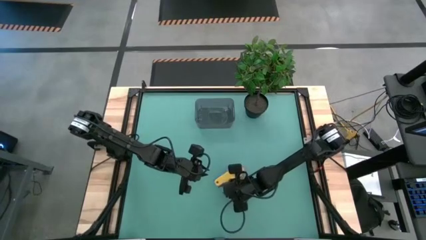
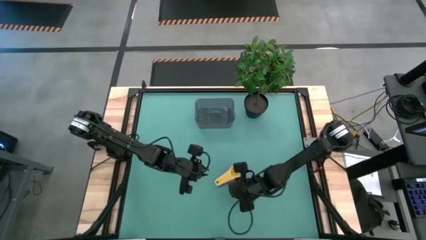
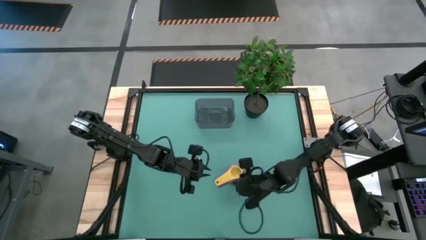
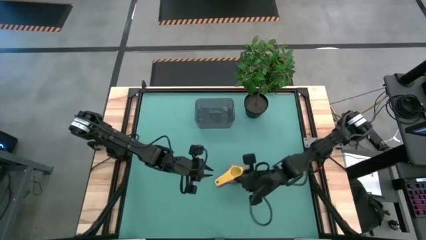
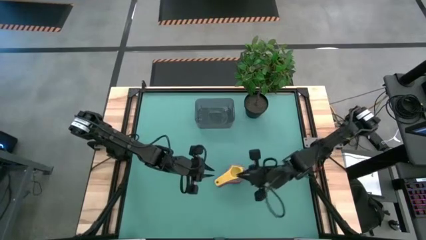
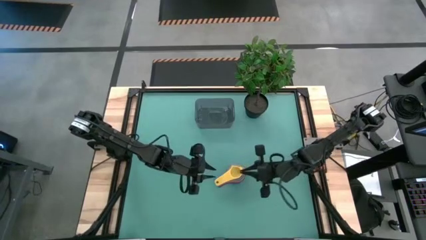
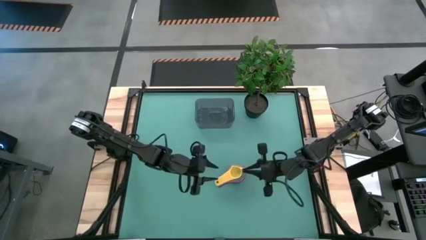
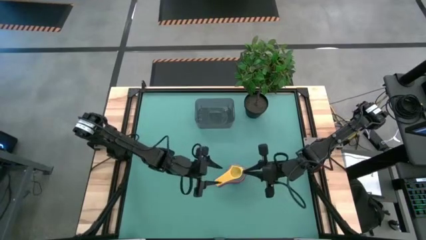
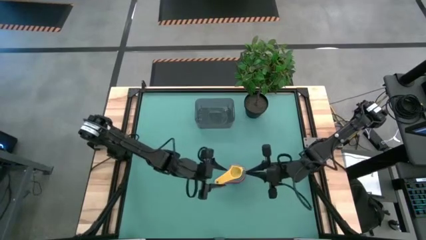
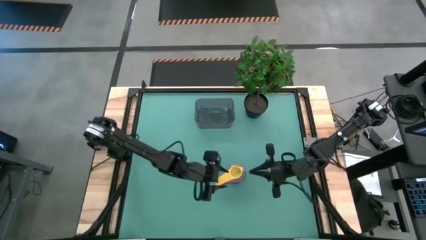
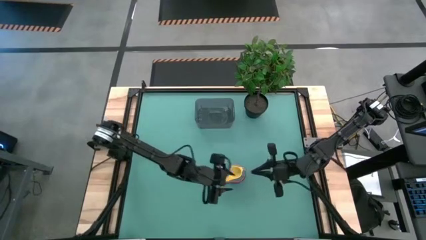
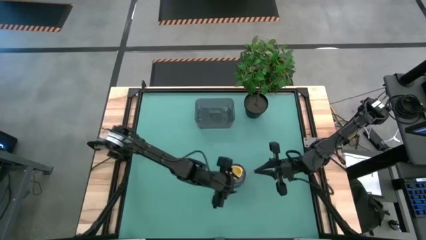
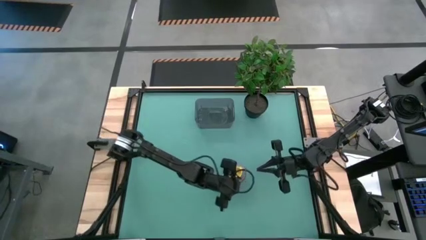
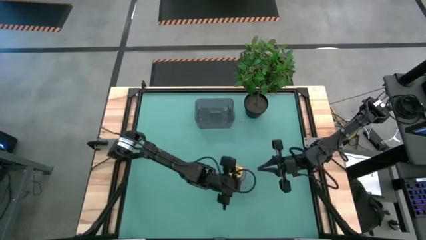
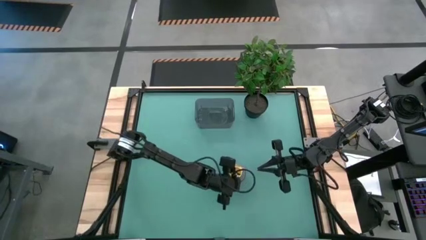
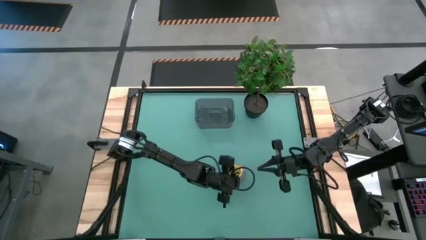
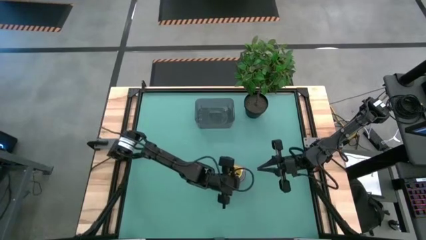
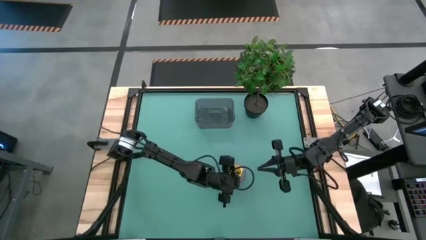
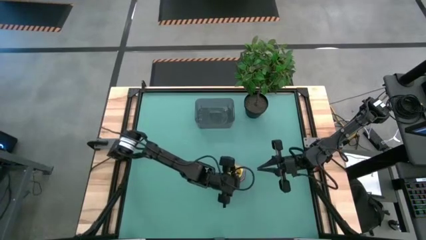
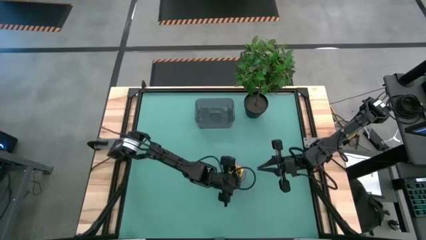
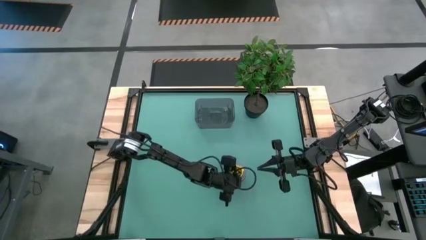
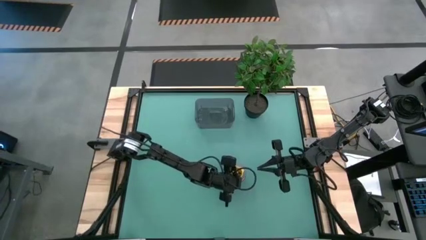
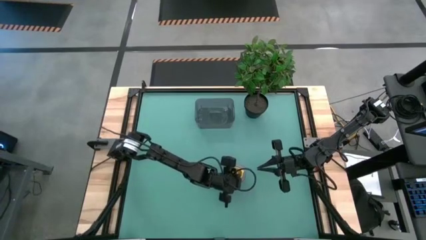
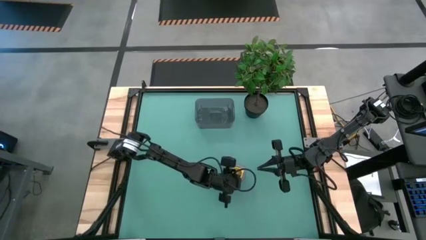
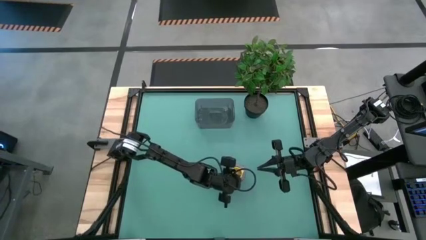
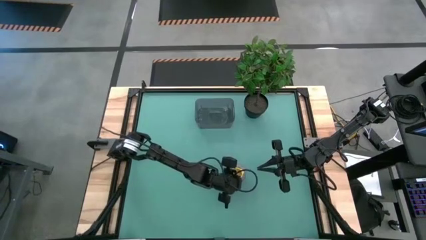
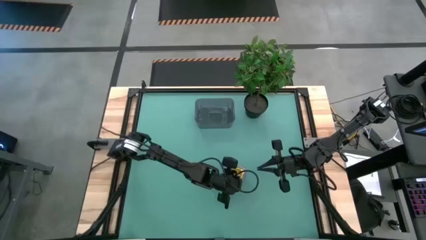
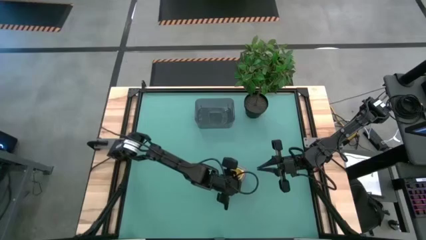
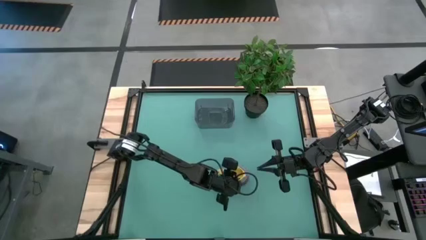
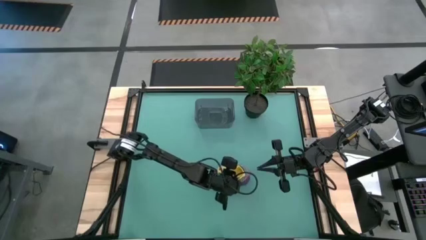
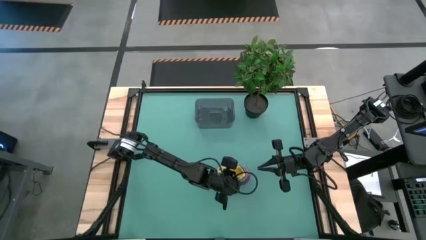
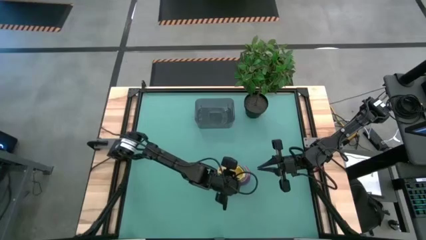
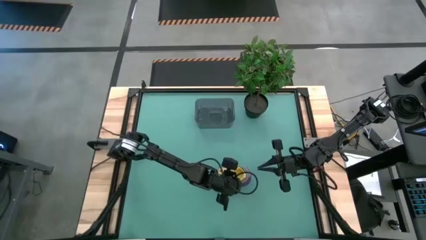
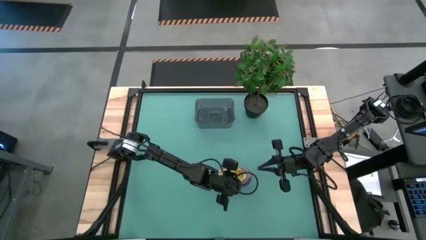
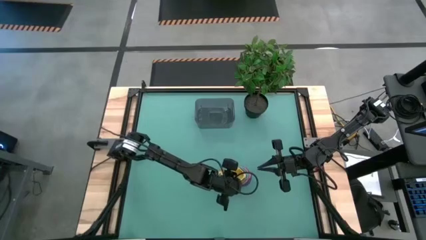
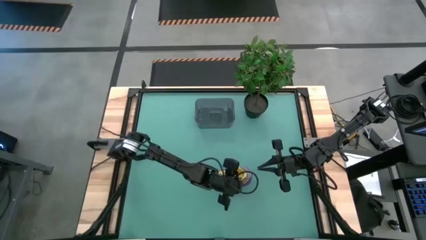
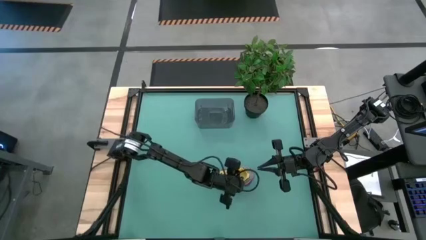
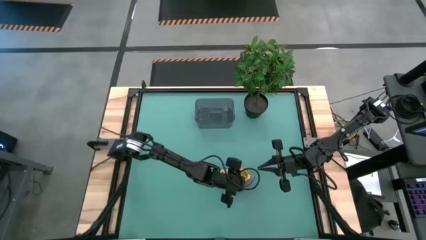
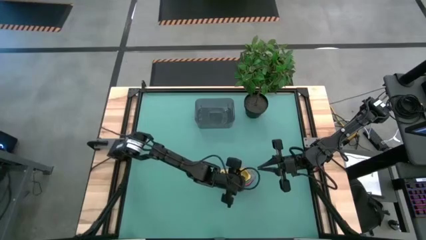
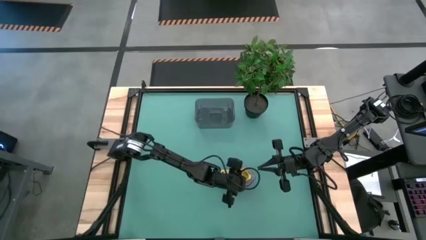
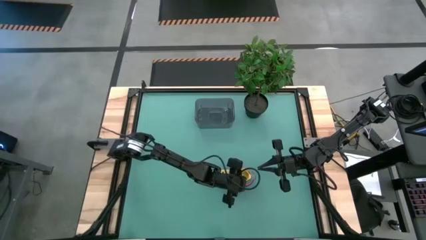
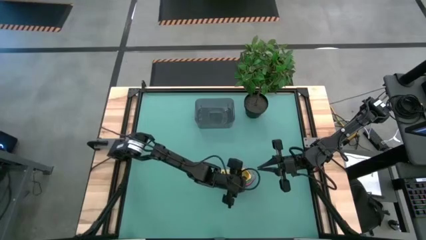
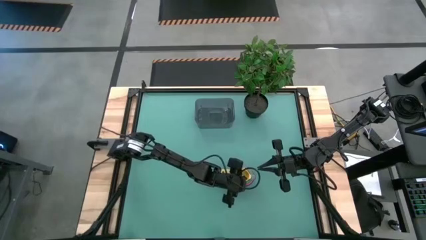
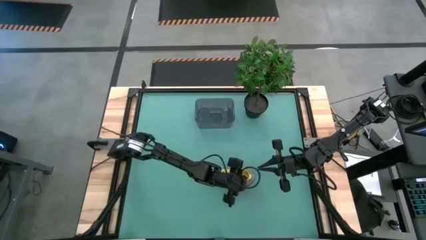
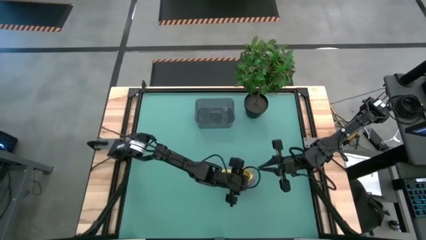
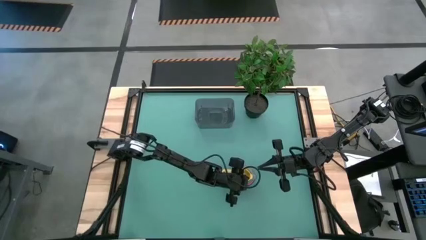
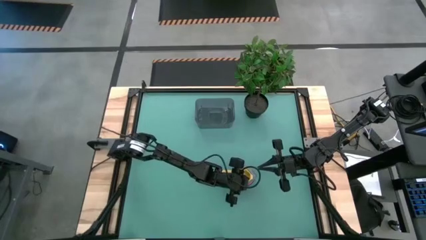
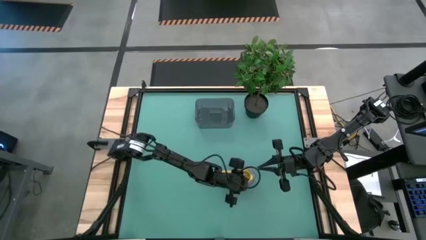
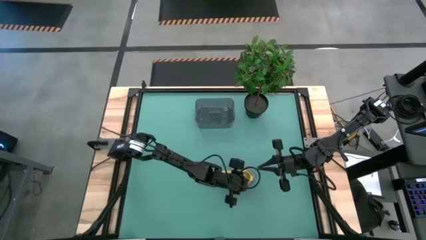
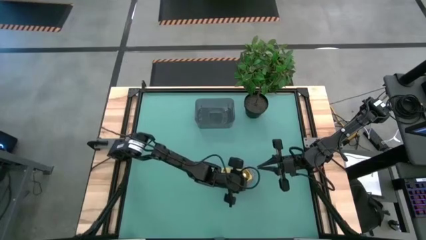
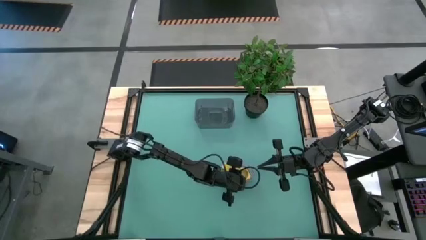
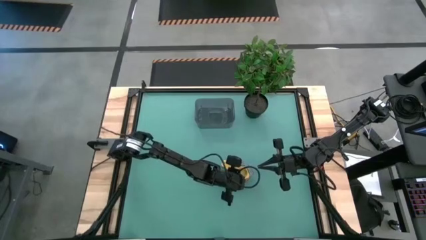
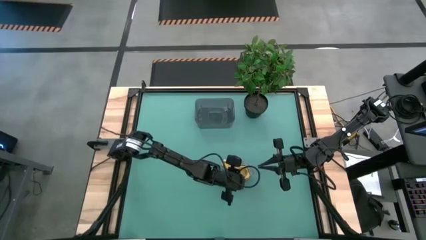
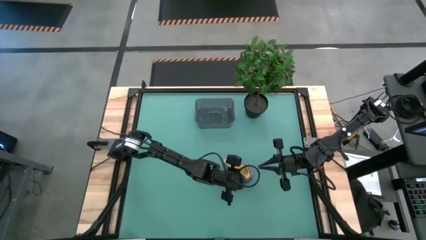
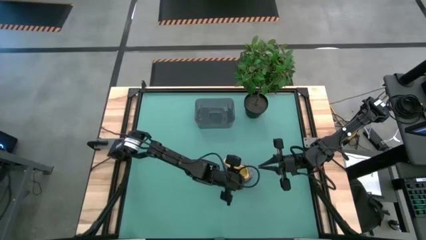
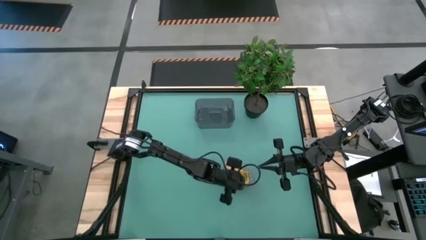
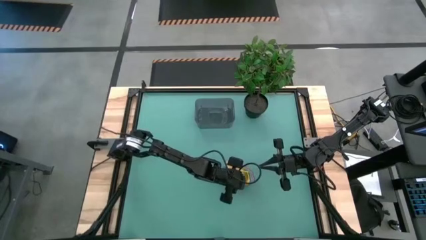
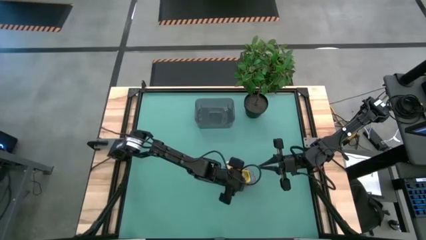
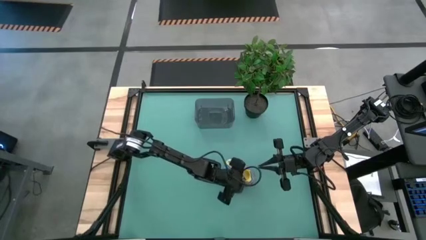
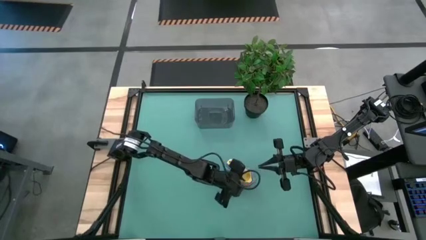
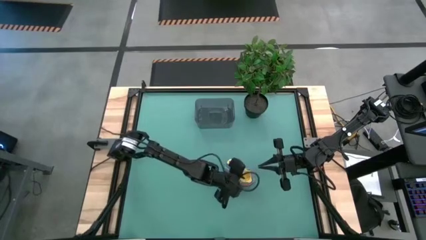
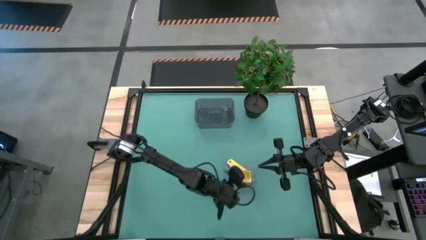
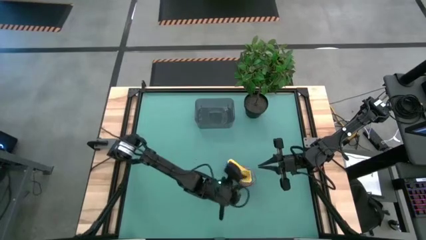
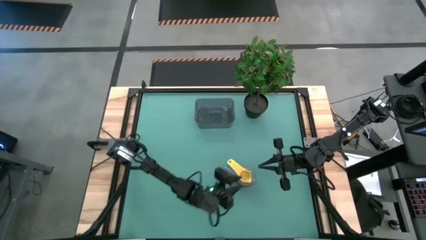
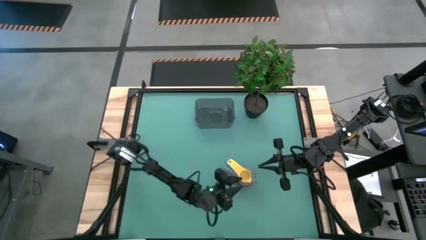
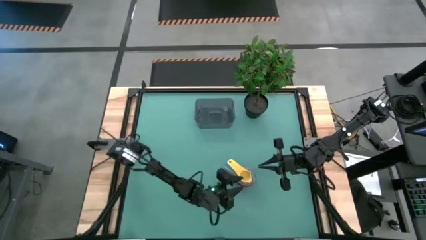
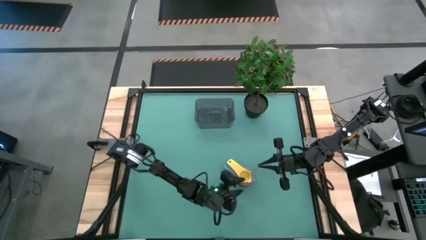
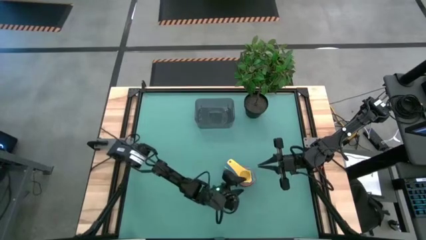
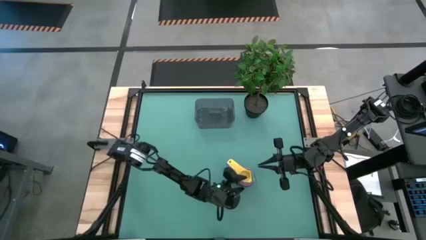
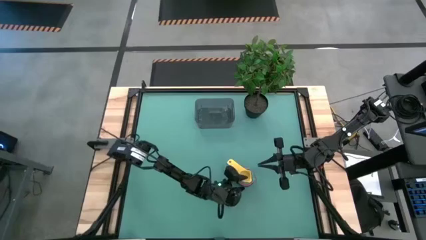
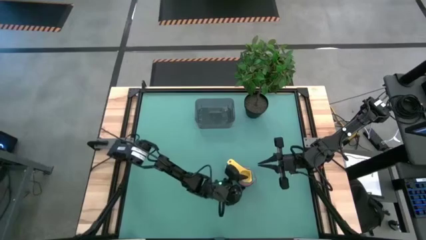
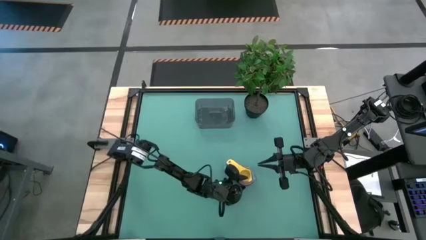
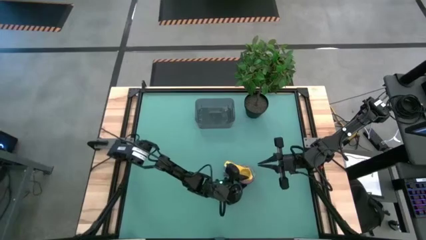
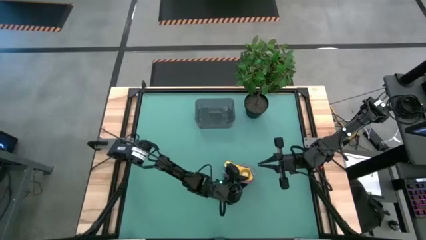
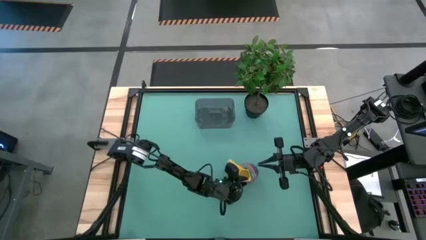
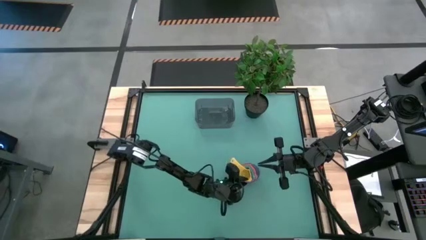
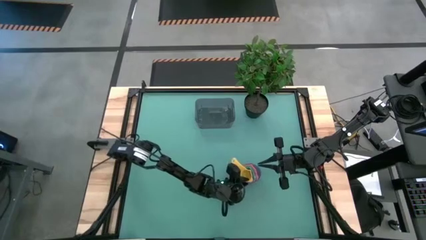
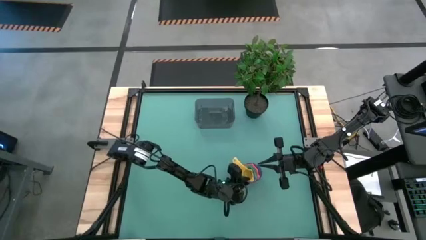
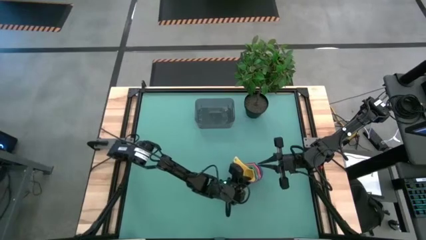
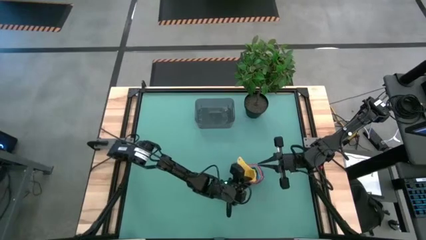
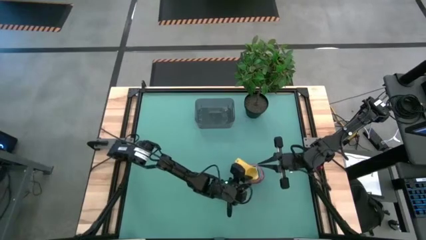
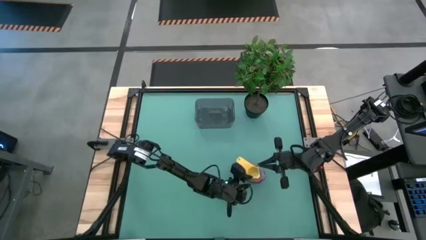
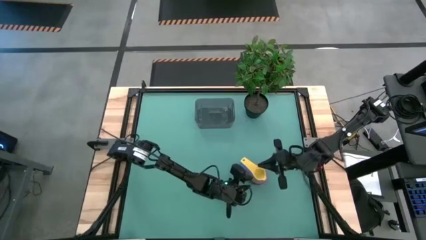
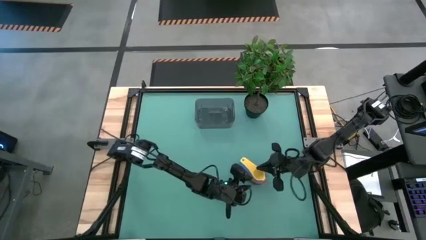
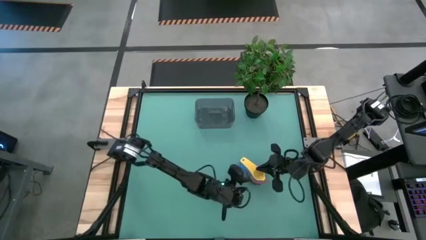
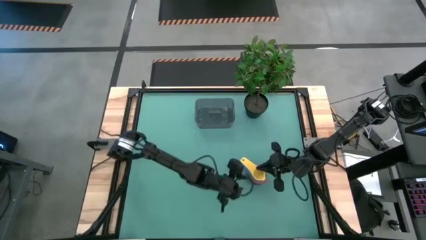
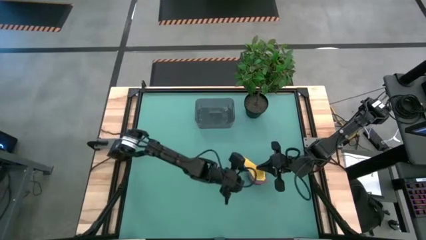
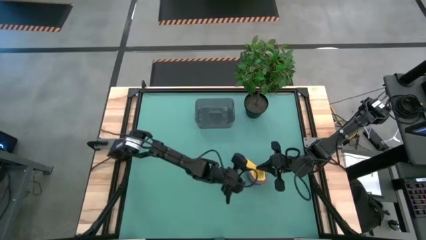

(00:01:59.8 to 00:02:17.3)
Task: Nest measuring cups in basket
Put the measuring cup into the bin
